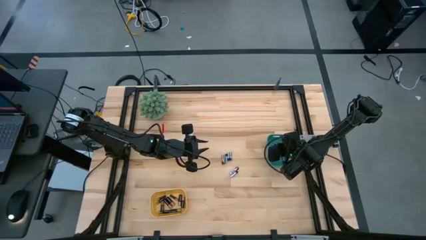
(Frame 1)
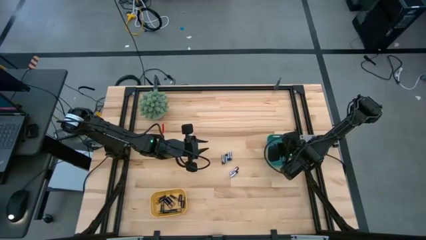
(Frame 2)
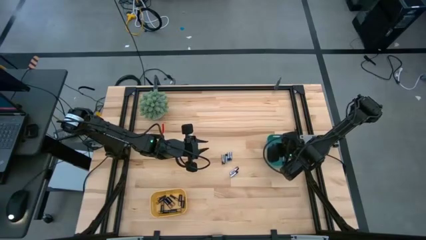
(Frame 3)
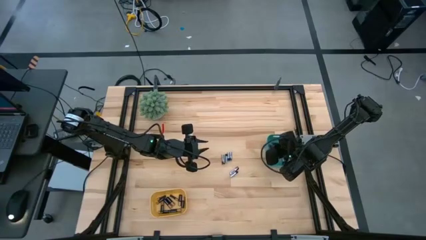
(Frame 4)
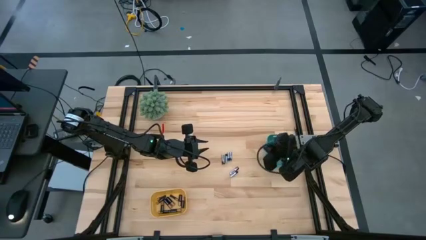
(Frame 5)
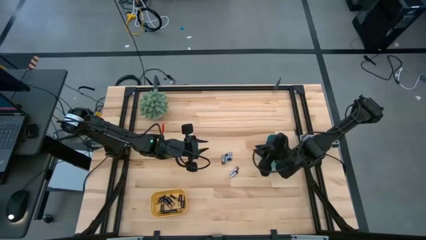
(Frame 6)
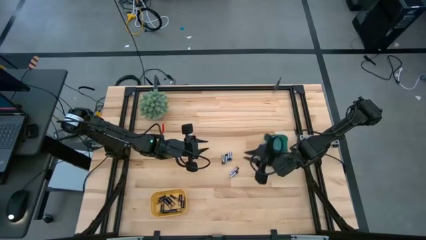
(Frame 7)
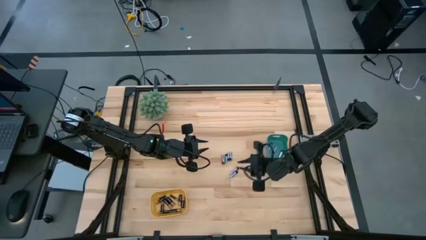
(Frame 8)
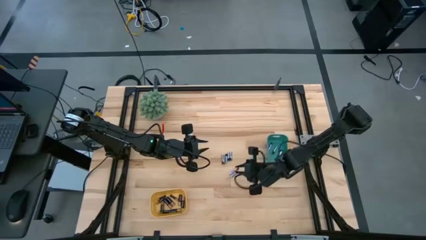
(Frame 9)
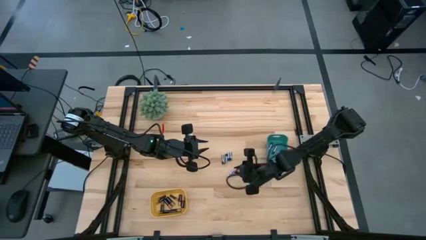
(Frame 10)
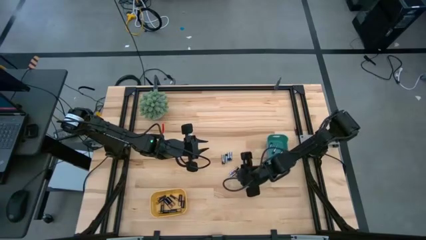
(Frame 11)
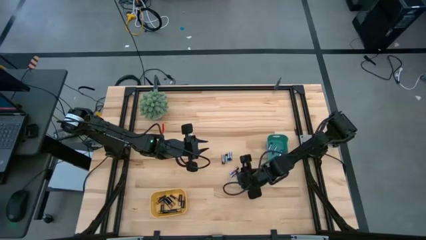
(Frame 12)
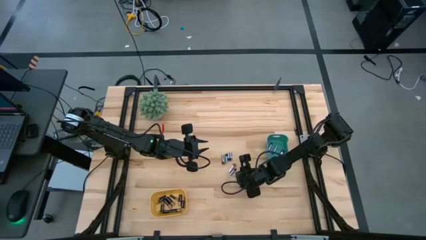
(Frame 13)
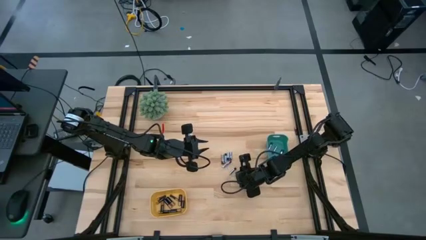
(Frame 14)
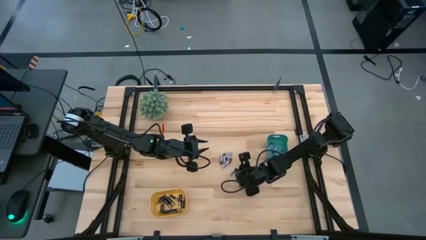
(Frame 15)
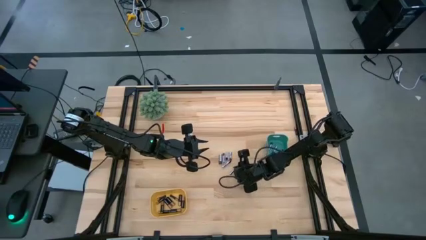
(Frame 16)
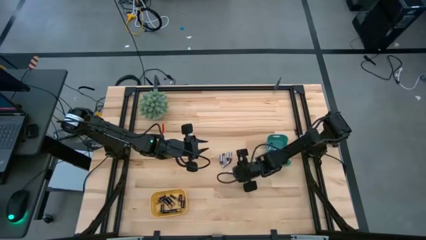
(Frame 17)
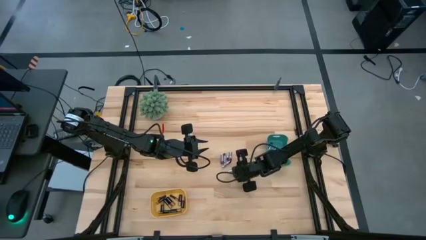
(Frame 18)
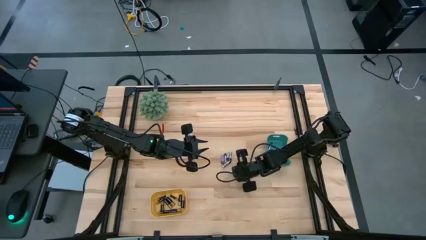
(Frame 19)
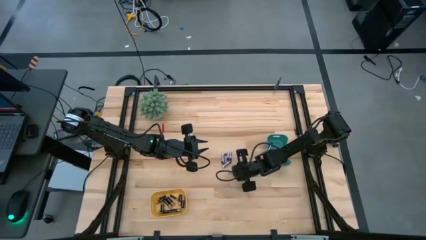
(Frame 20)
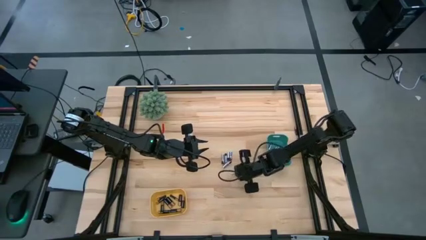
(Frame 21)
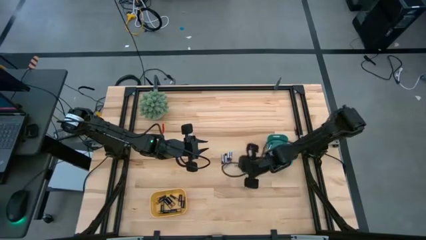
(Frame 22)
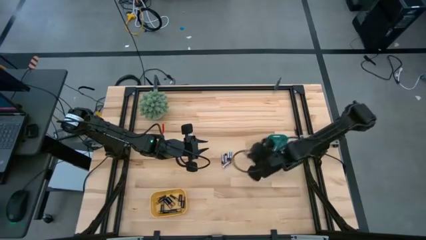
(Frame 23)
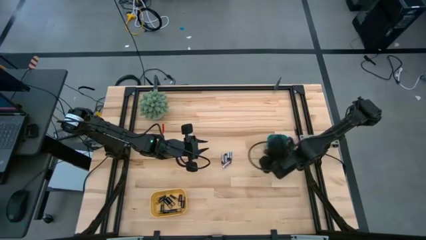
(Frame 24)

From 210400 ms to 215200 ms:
Task: Sort batteries
Put the silver battery into the green bin

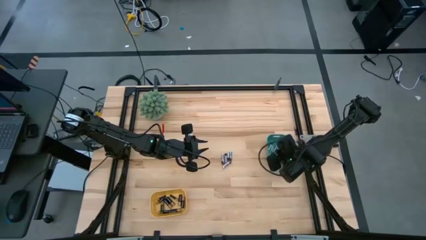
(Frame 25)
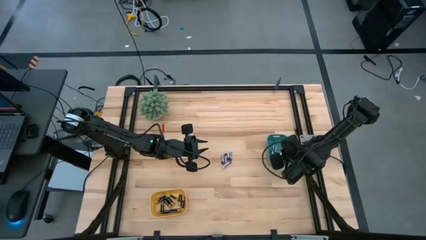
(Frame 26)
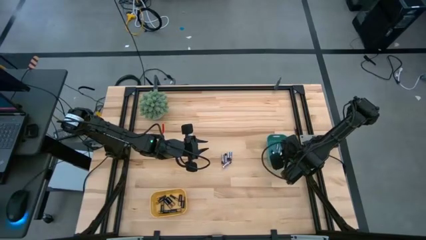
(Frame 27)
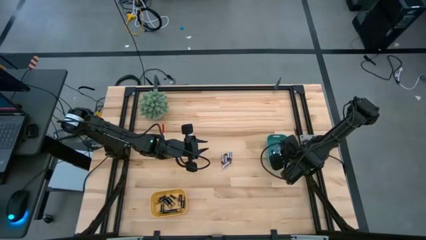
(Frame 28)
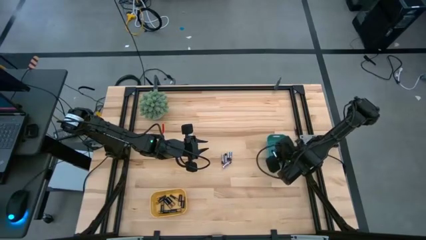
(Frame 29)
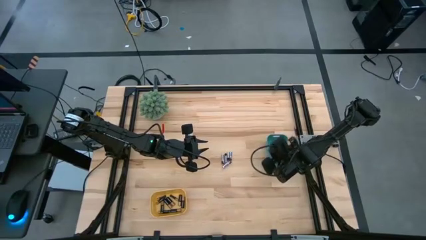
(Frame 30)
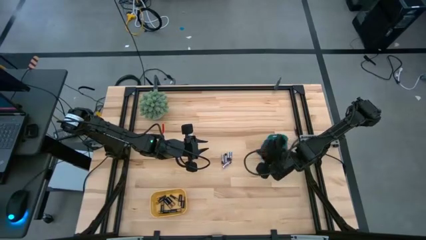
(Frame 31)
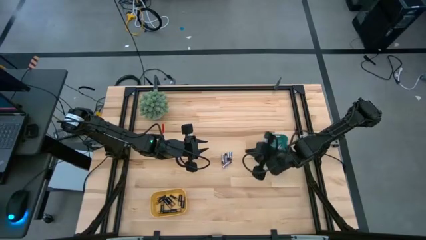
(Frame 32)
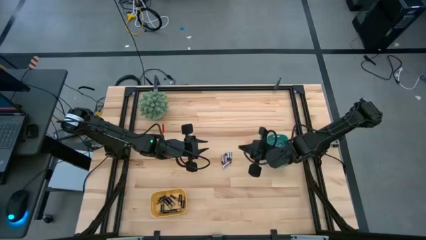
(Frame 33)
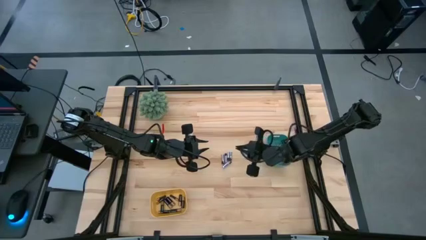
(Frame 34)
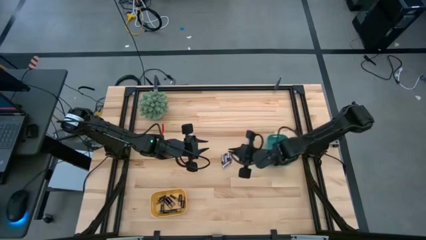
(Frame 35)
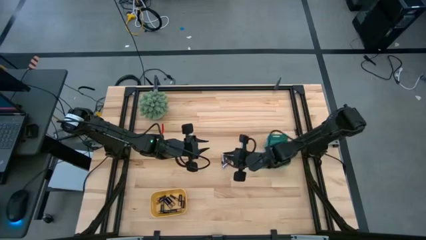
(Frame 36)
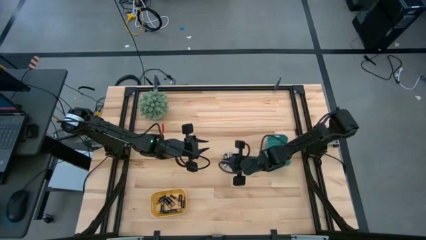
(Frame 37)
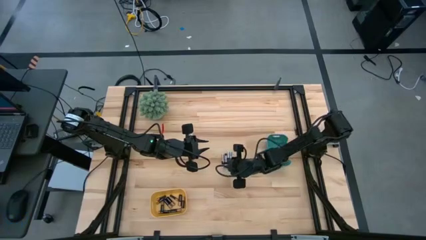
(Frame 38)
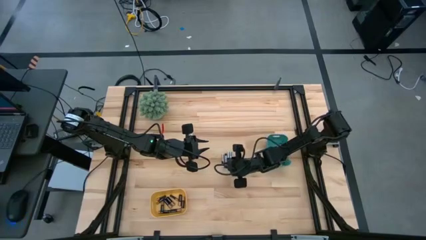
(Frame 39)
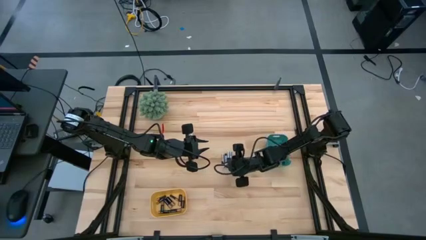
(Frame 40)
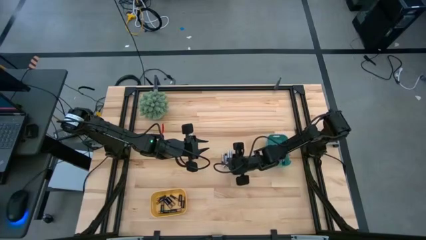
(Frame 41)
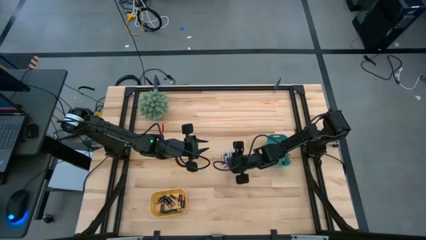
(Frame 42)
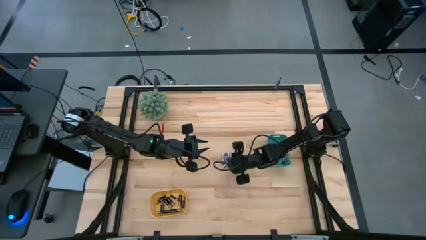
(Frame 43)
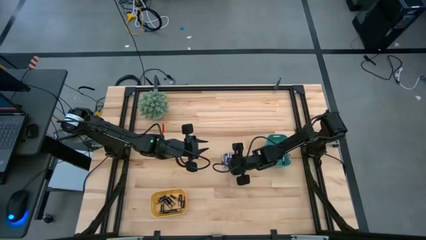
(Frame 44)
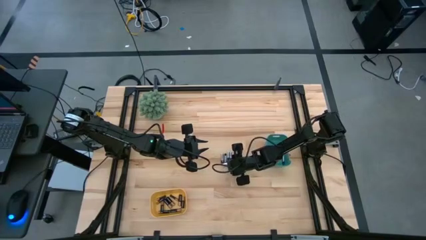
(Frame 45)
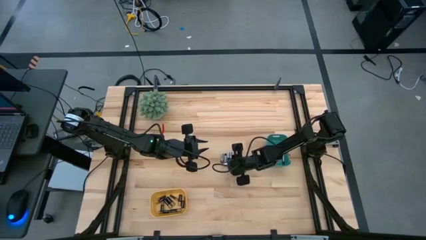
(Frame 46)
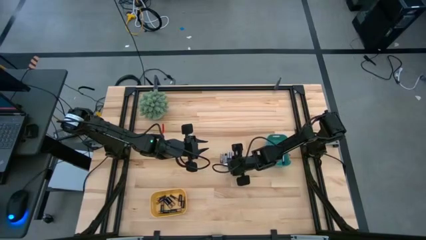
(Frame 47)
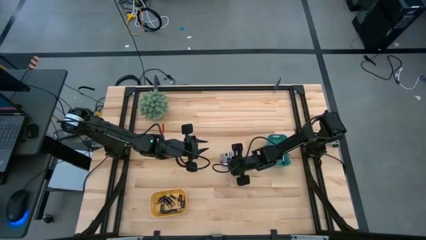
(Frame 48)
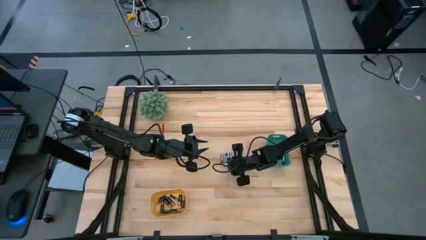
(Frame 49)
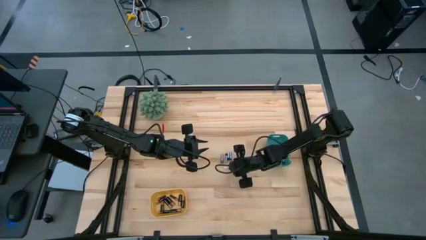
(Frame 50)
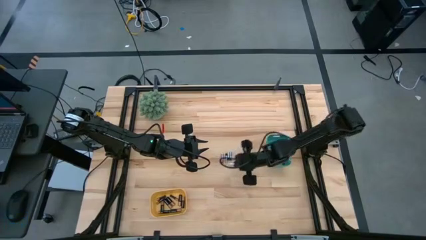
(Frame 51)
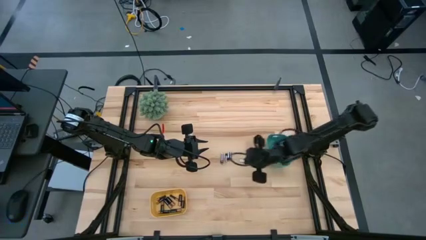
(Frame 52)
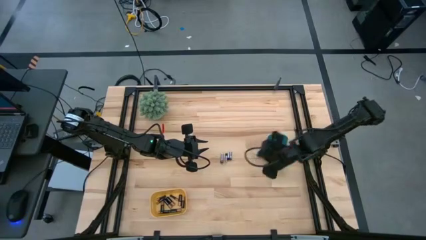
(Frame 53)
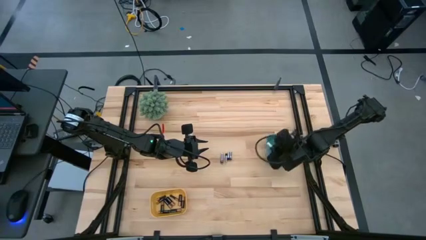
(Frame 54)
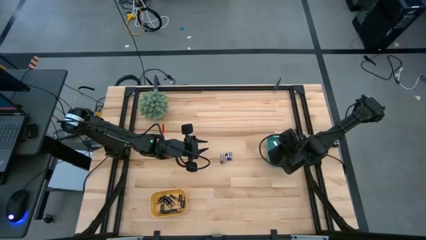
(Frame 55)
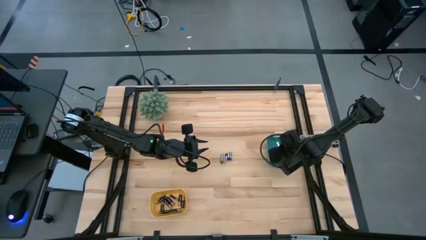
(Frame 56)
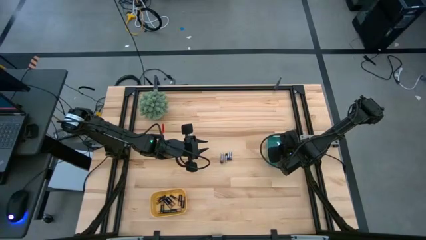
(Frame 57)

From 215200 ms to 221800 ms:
Put the silver battery into the green bin
